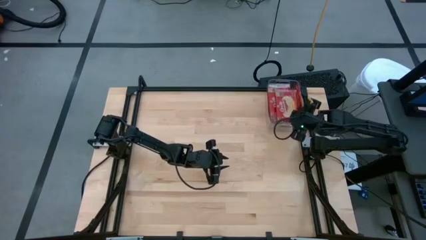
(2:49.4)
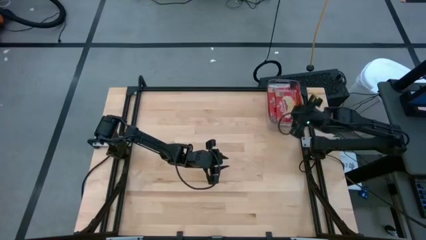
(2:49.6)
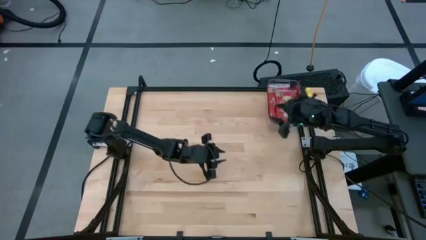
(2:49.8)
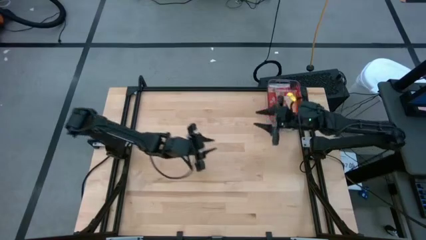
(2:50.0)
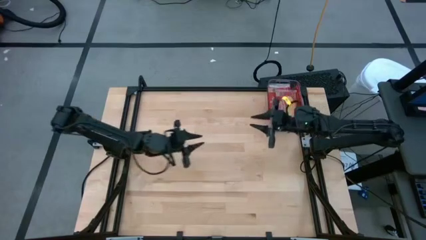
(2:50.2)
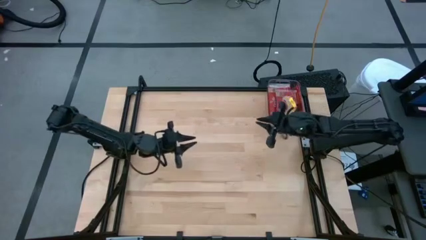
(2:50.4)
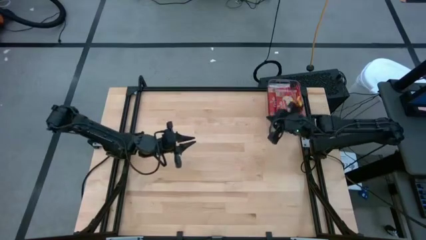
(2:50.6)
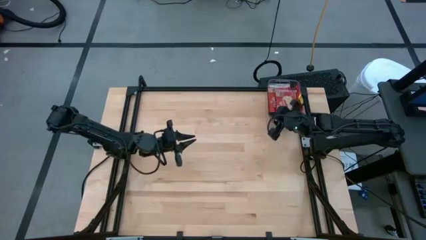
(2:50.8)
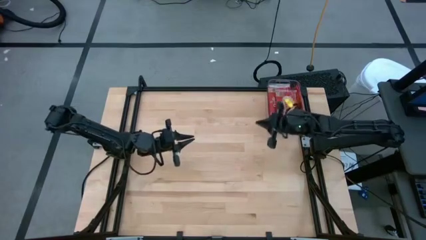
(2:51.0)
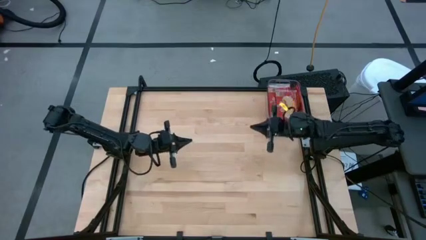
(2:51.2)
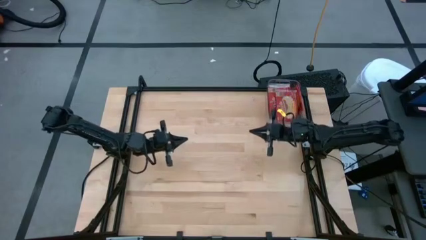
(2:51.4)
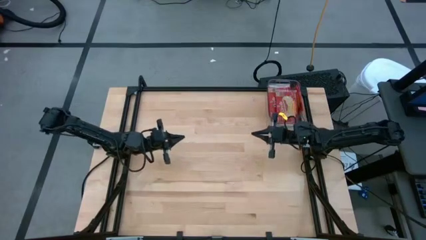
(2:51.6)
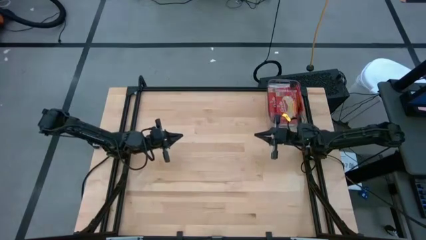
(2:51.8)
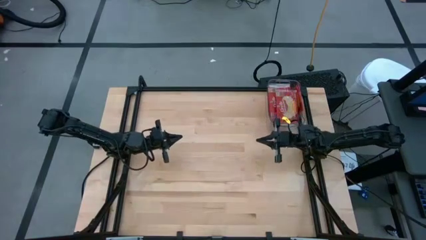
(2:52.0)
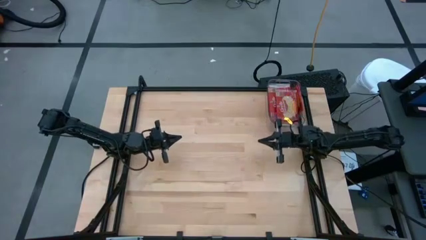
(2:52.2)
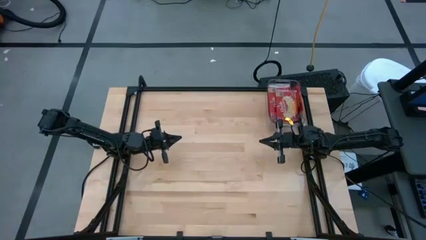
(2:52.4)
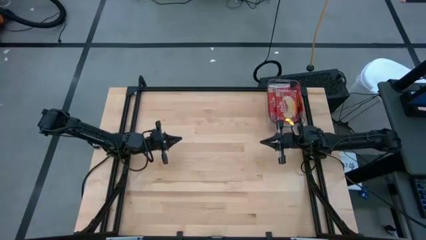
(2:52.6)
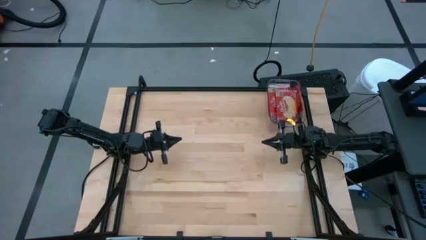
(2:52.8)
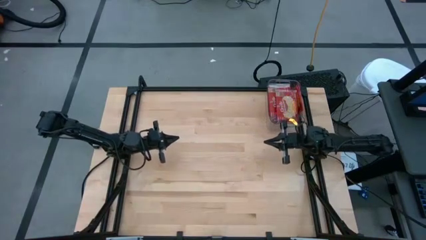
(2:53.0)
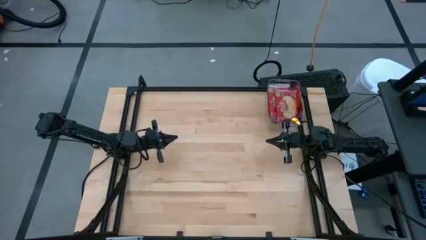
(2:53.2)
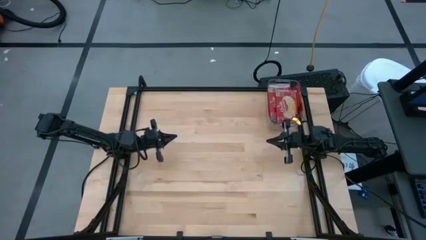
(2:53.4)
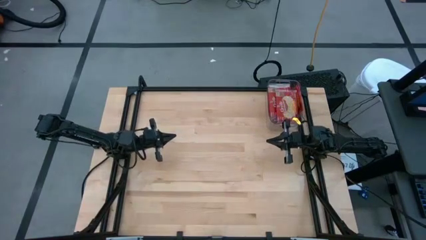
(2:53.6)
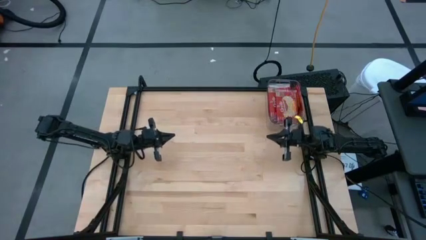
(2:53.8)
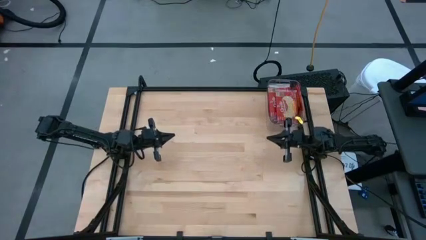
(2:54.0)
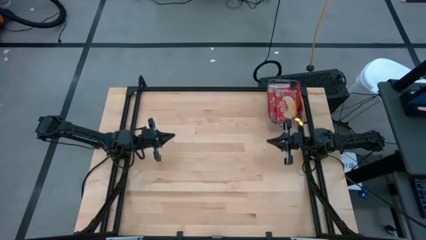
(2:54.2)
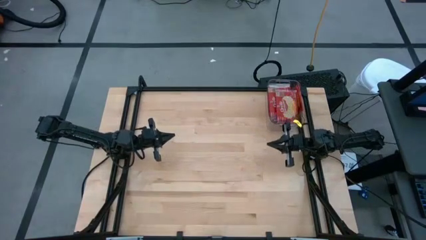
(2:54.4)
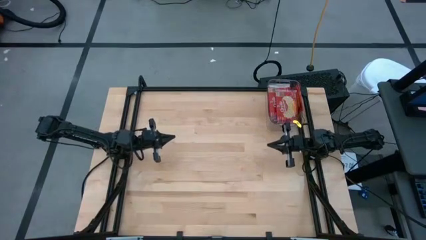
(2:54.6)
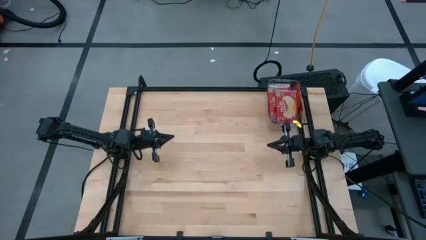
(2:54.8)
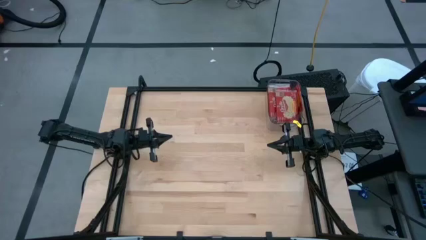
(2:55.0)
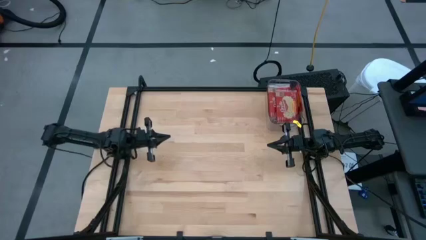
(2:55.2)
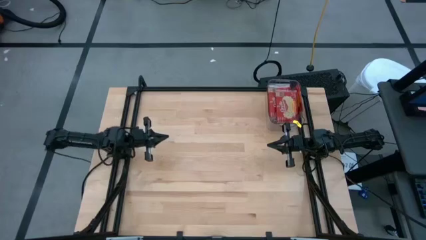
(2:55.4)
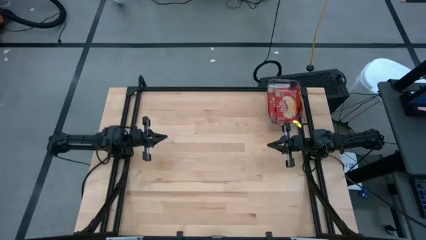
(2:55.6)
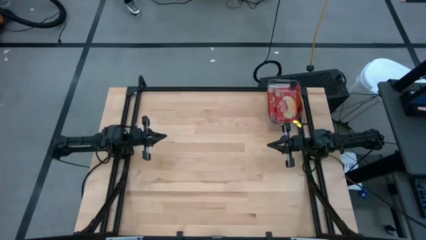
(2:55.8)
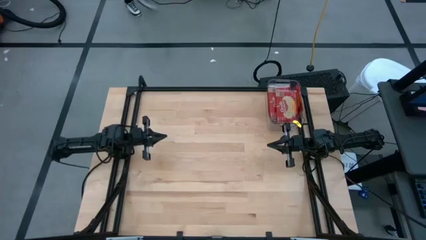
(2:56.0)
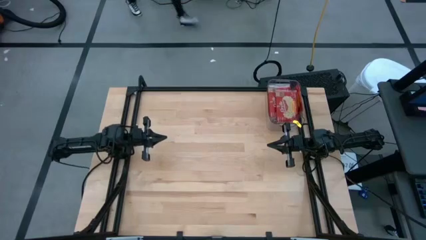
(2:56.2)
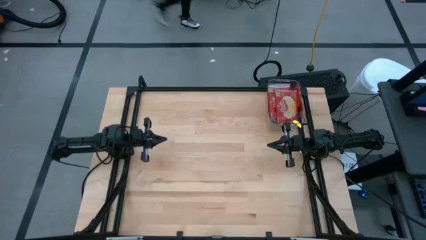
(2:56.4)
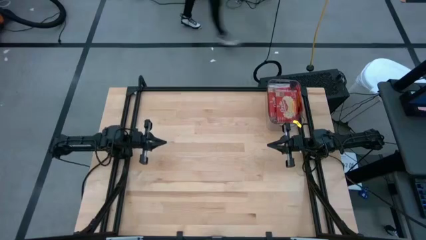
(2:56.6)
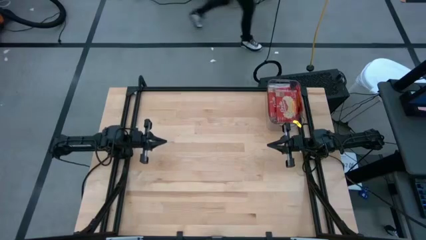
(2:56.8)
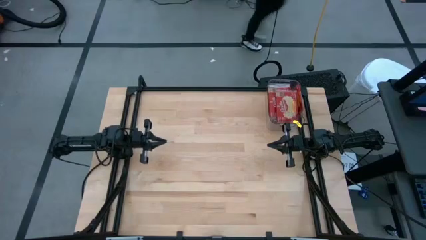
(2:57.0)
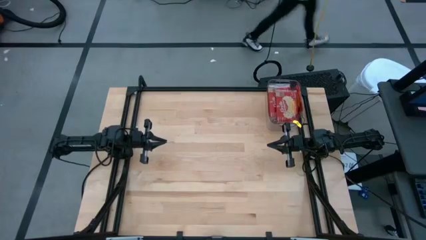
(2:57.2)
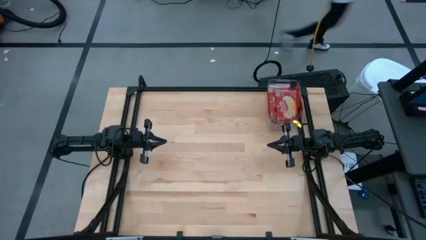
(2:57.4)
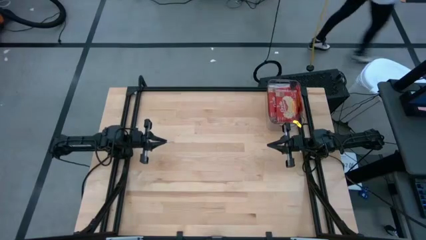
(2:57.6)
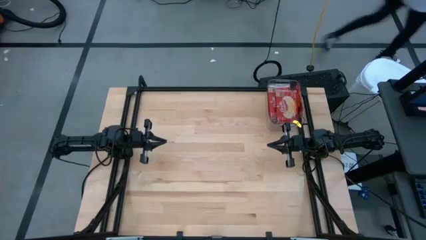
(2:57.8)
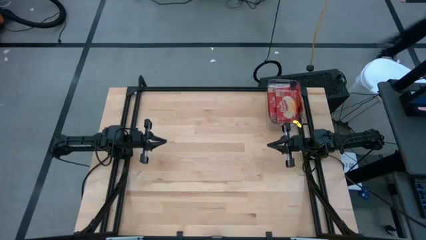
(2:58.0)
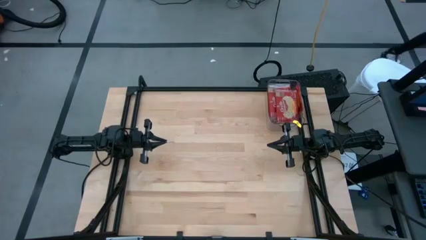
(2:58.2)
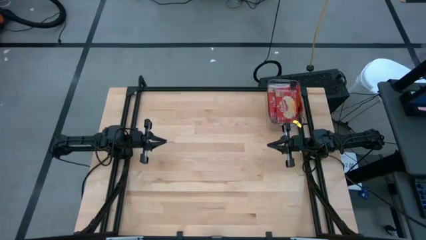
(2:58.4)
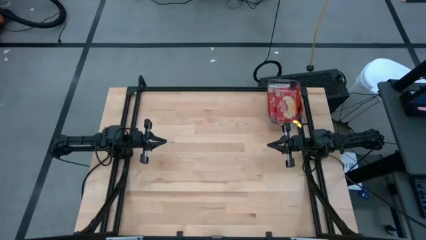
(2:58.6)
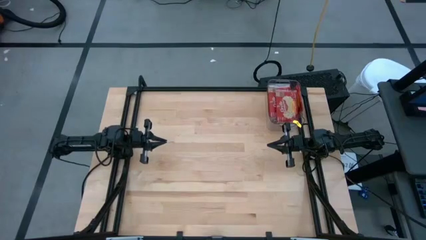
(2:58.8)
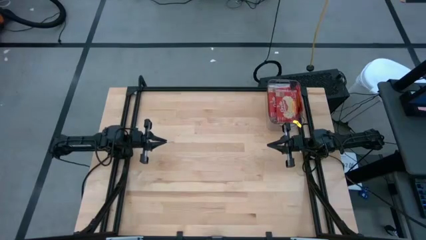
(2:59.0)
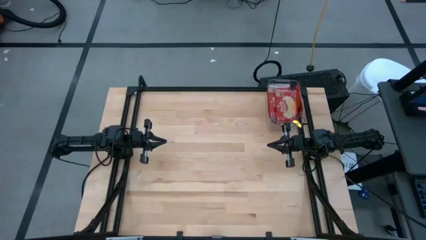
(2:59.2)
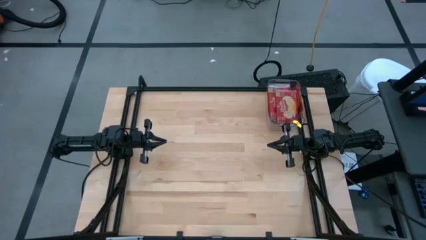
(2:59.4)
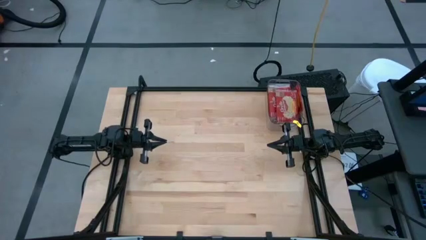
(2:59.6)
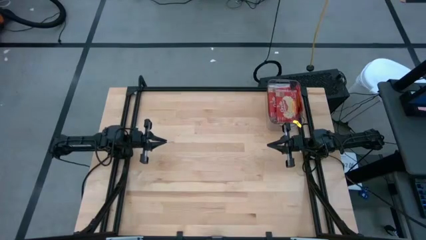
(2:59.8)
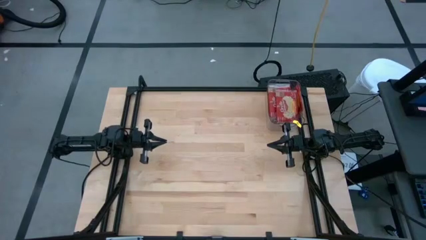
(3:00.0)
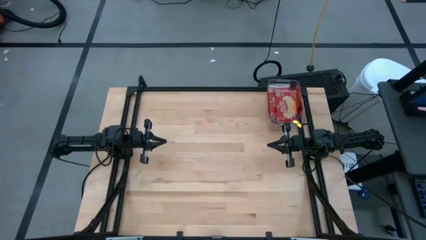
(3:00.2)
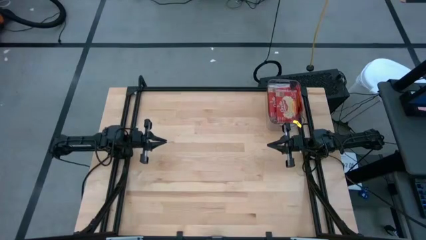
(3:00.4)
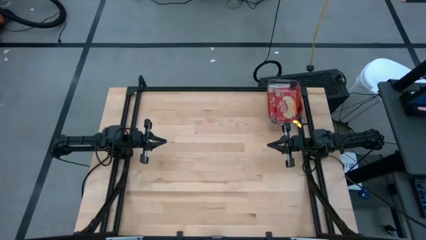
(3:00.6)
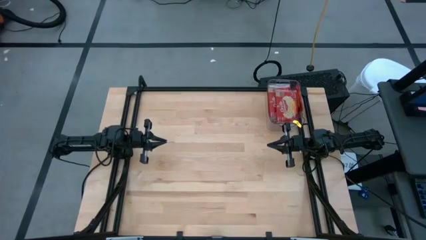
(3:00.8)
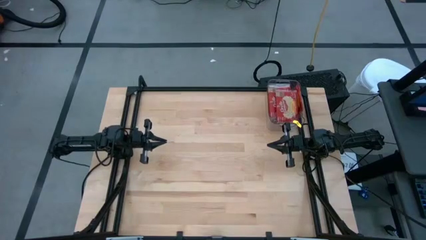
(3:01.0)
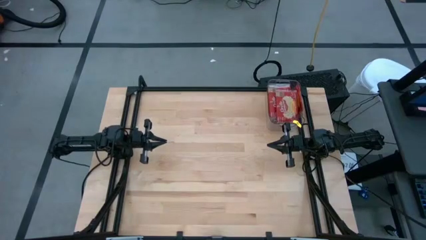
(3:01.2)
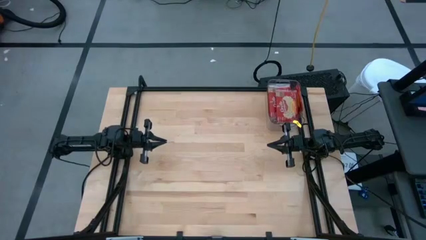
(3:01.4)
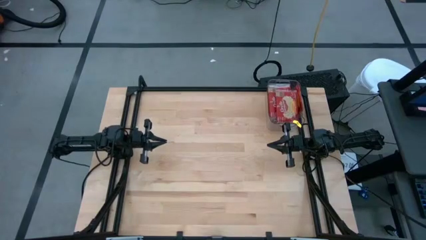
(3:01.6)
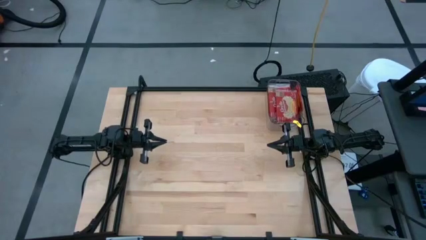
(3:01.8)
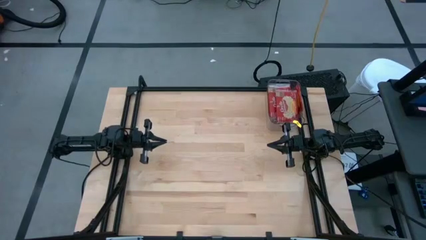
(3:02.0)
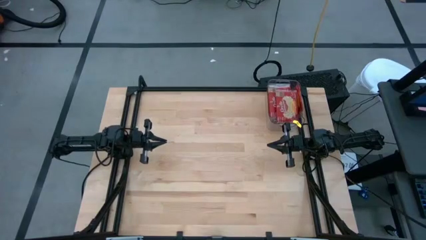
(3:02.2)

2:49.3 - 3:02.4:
Task: Sort popcorn bags into baskets
Return to Home Position

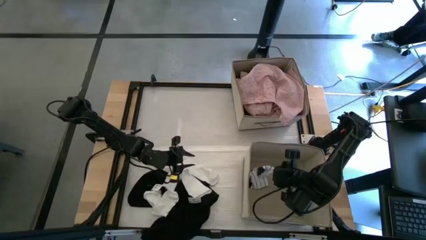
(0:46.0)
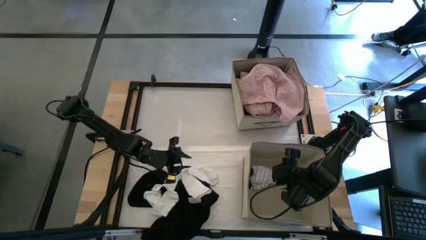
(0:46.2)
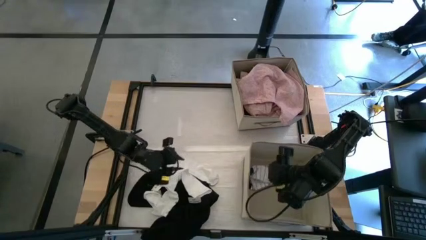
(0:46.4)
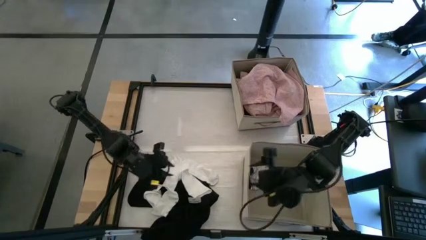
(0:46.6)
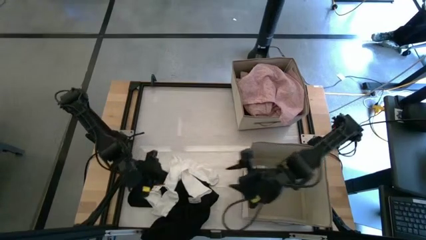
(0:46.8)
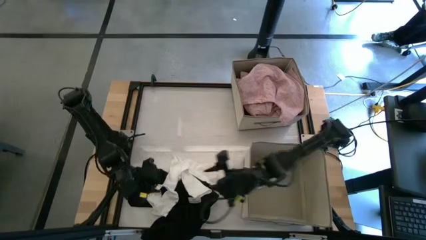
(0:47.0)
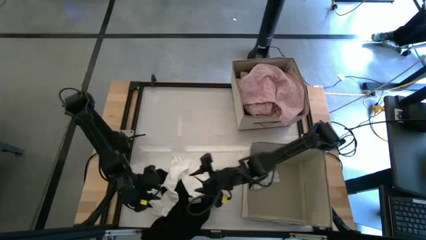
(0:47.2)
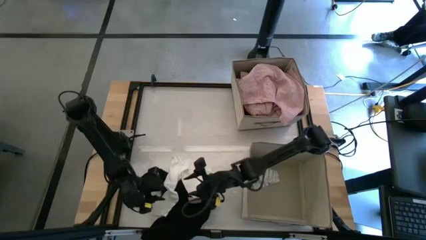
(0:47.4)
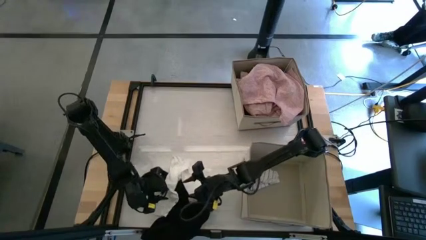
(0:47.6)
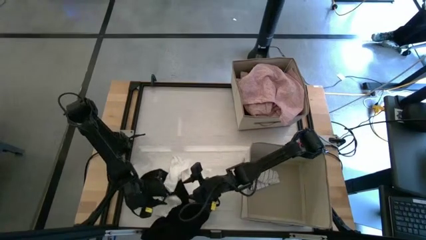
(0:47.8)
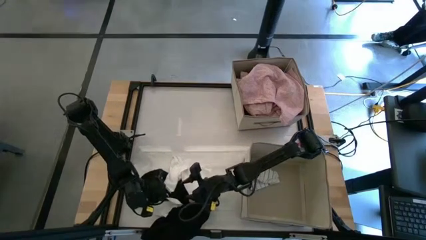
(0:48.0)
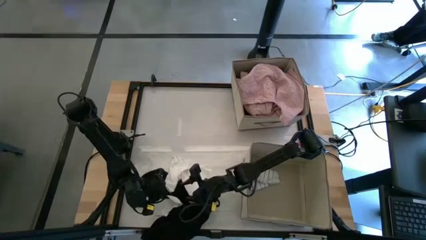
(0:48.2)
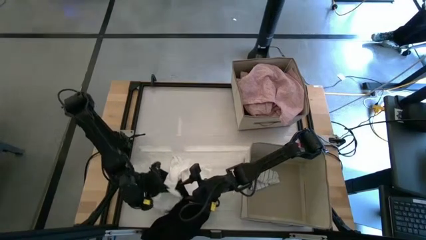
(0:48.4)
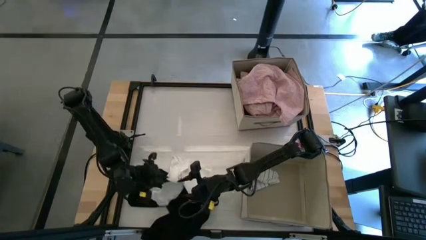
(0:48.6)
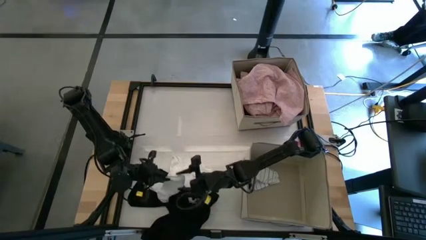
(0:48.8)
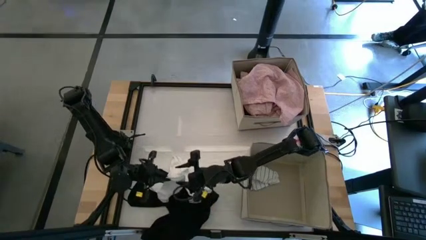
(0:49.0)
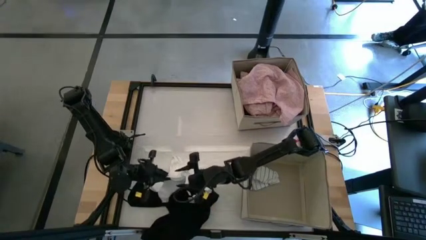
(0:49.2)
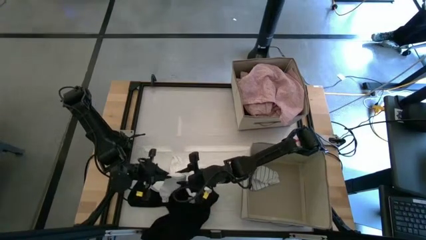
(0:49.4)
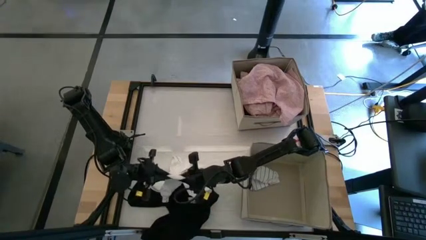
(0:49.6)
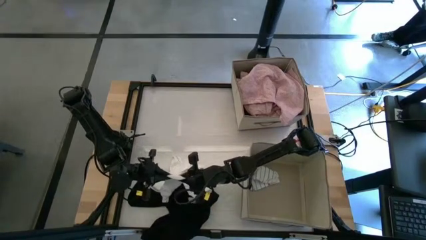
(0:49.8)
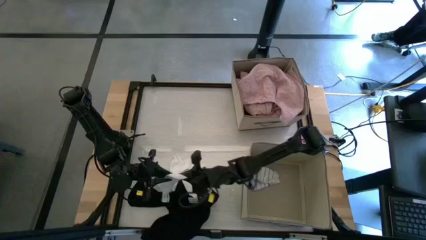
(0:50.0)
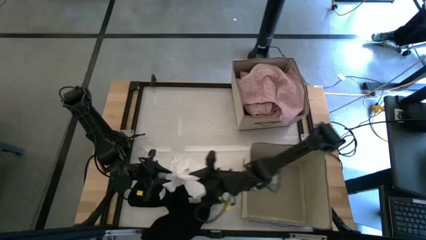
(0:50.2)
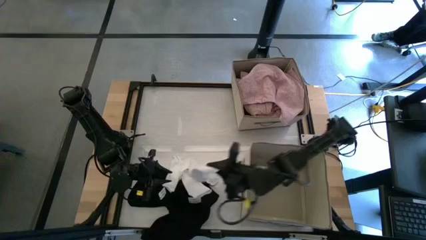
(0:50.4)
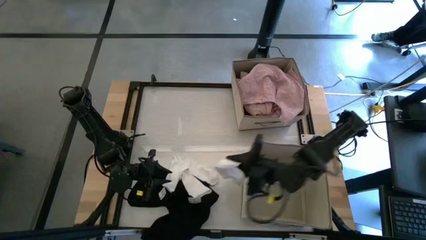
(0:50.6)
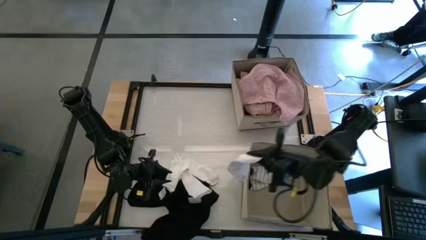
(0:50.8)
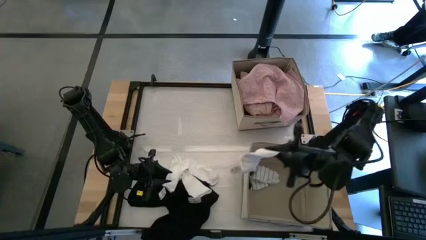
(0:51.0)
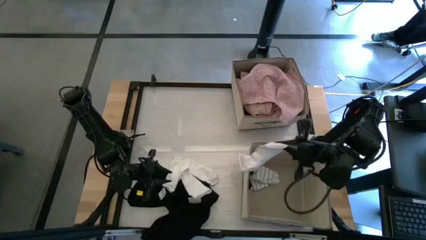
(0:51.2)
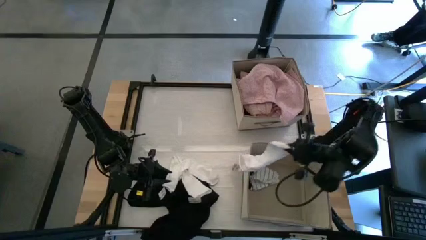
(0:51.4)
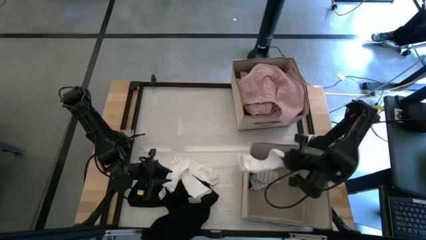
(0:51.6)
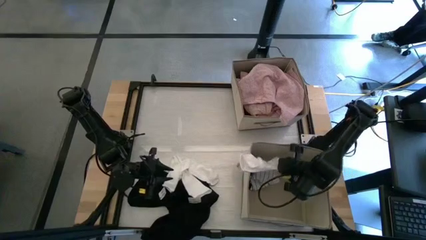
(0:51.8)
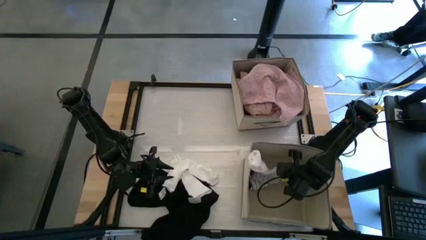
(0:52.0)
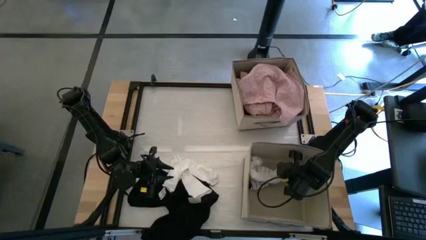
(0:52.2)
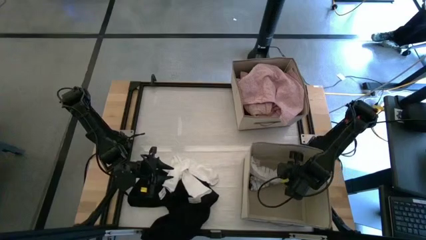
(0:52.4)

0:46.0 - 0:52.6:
Task: Sort clothes
Put the white sock into the bottom laundry organizer
